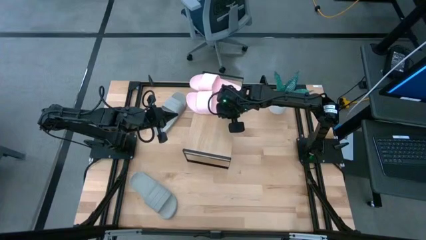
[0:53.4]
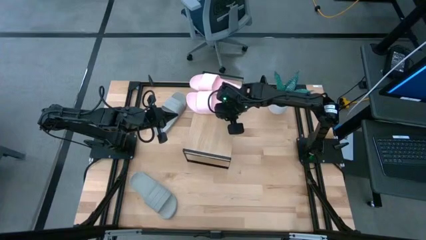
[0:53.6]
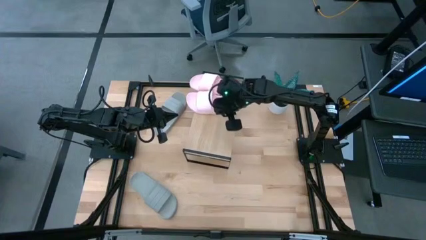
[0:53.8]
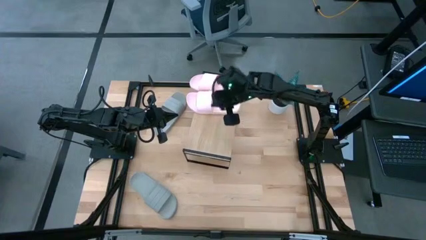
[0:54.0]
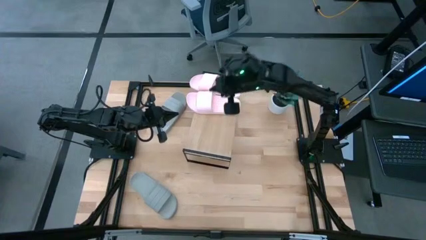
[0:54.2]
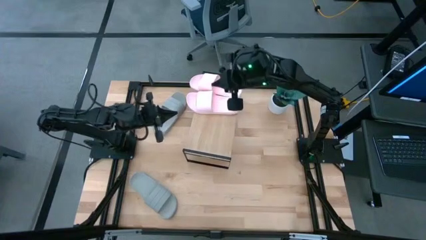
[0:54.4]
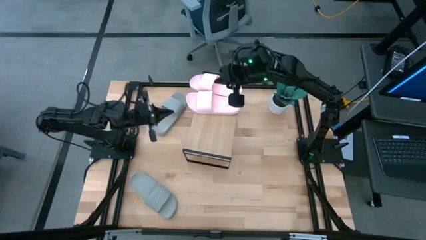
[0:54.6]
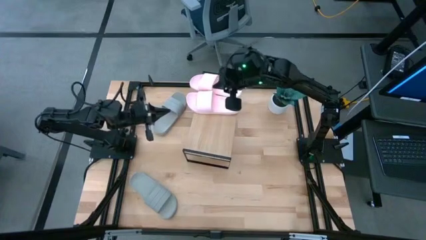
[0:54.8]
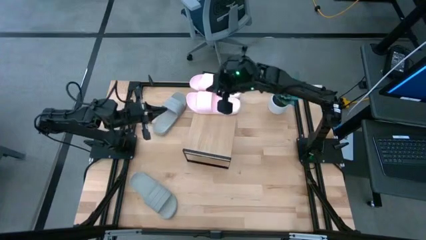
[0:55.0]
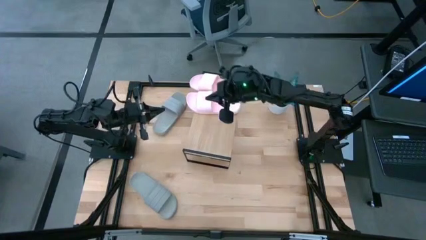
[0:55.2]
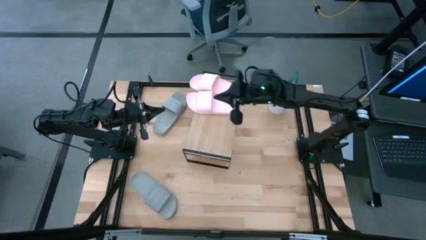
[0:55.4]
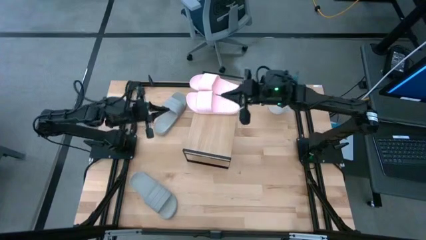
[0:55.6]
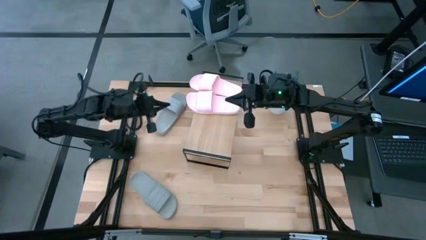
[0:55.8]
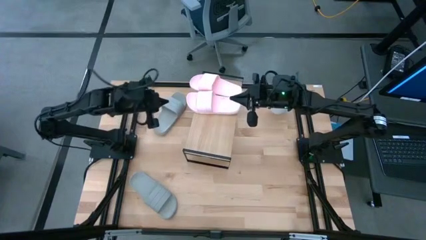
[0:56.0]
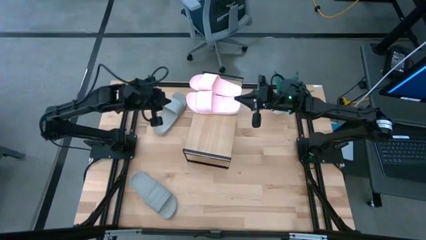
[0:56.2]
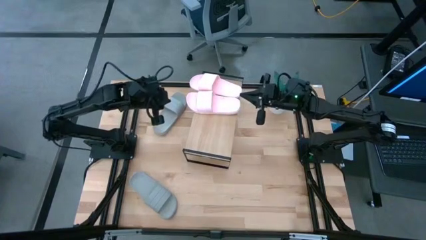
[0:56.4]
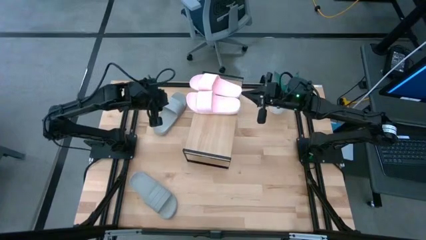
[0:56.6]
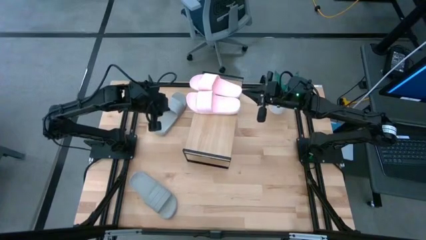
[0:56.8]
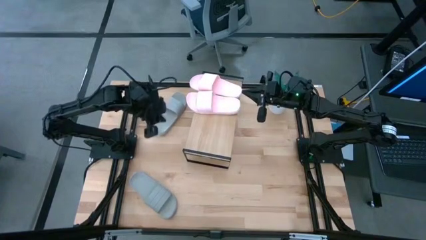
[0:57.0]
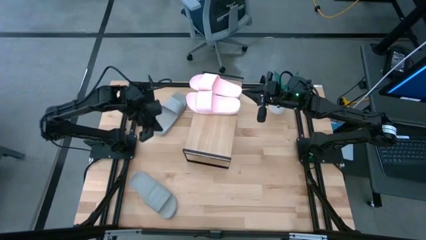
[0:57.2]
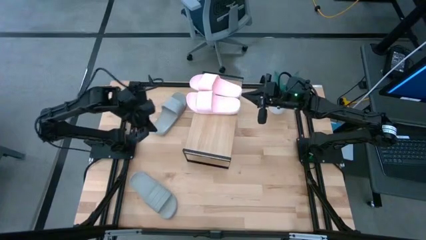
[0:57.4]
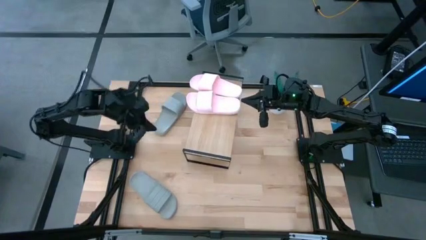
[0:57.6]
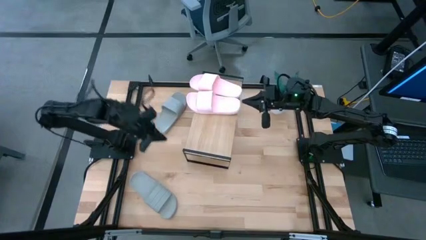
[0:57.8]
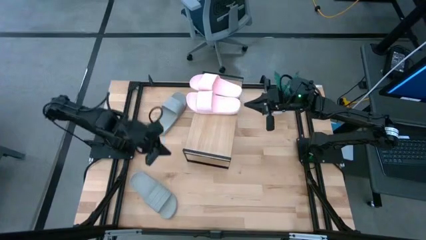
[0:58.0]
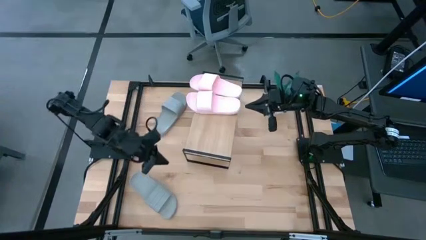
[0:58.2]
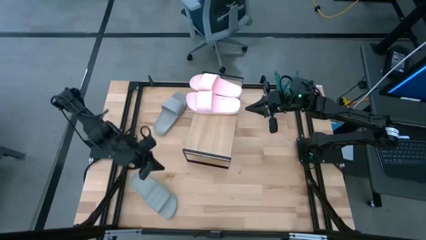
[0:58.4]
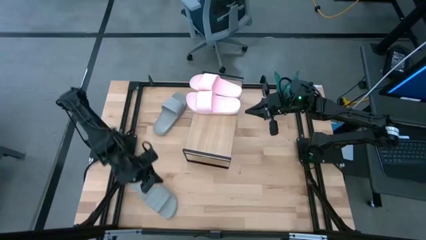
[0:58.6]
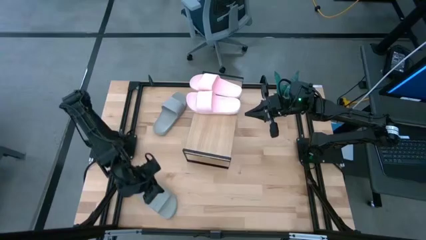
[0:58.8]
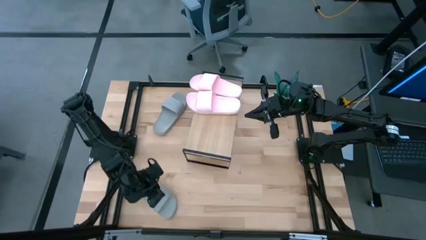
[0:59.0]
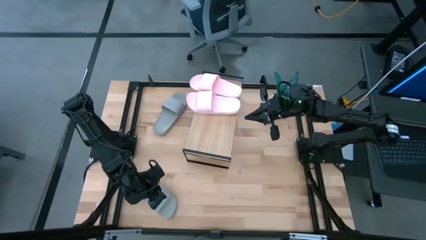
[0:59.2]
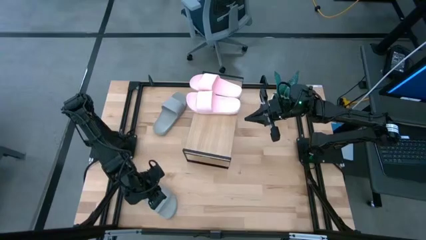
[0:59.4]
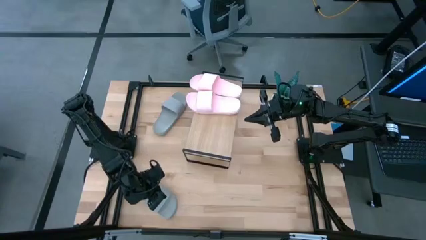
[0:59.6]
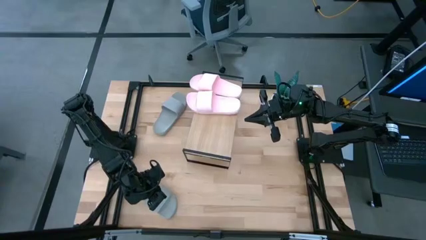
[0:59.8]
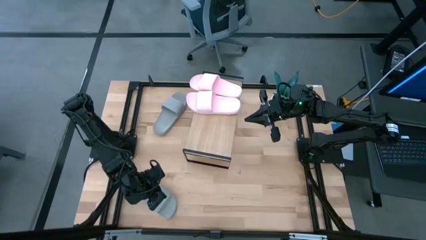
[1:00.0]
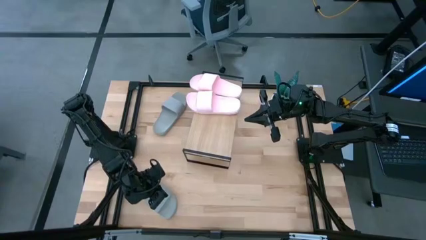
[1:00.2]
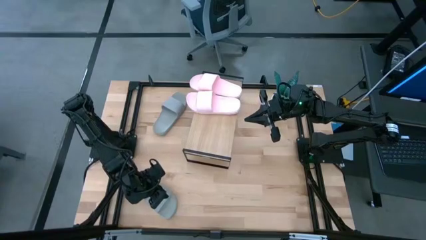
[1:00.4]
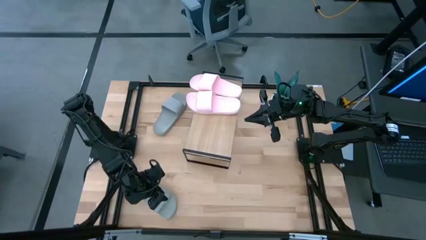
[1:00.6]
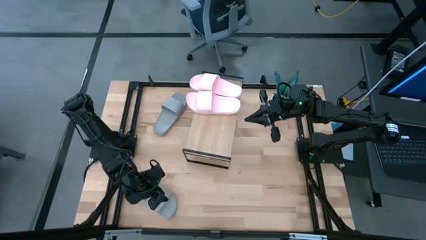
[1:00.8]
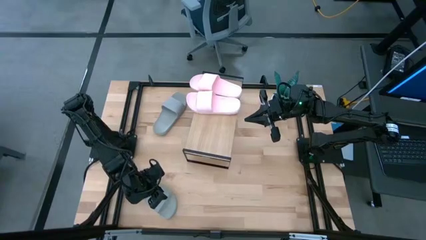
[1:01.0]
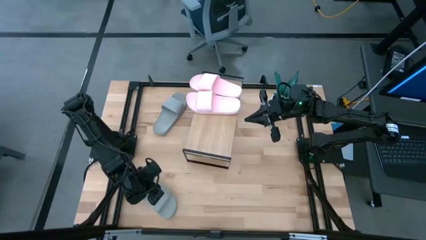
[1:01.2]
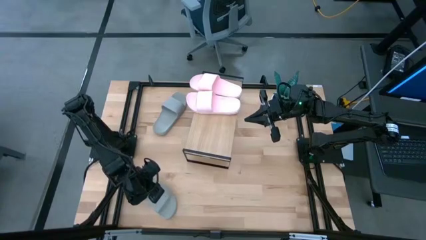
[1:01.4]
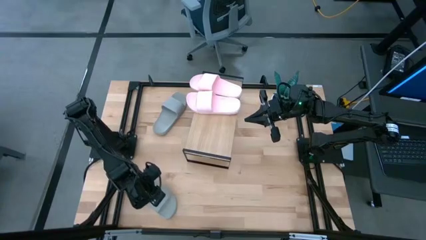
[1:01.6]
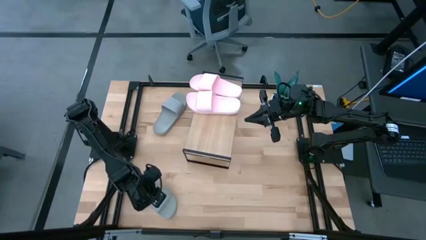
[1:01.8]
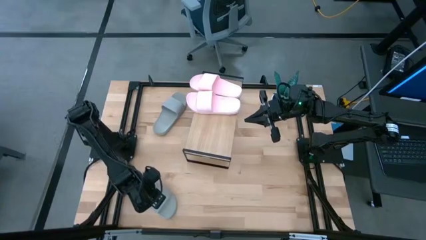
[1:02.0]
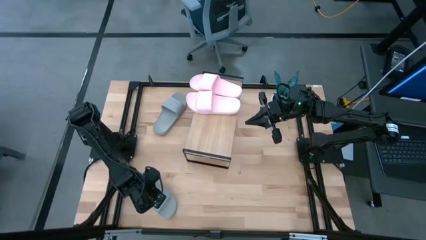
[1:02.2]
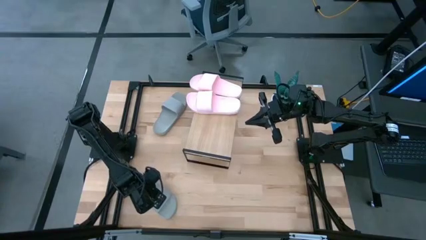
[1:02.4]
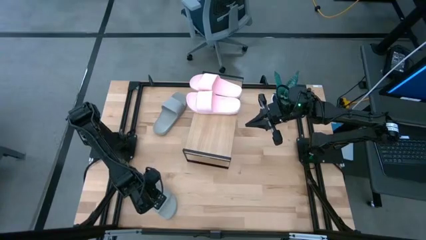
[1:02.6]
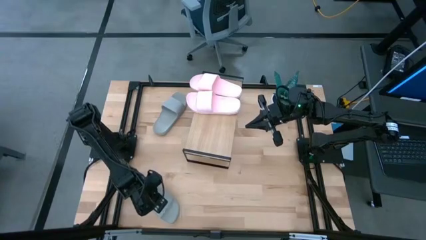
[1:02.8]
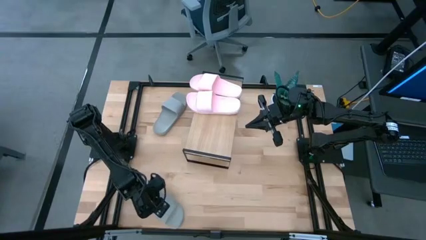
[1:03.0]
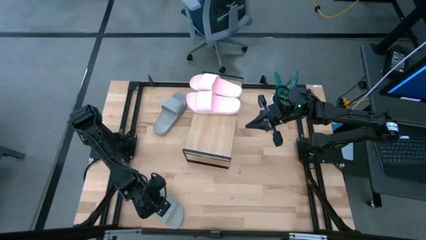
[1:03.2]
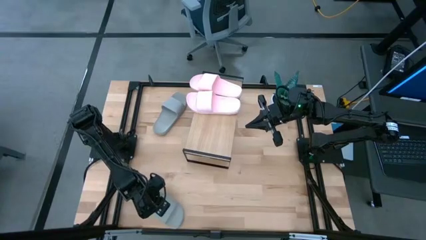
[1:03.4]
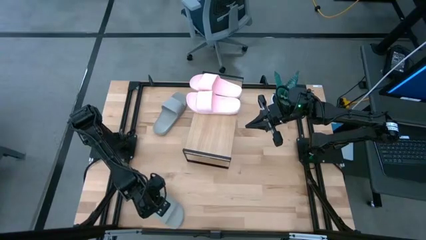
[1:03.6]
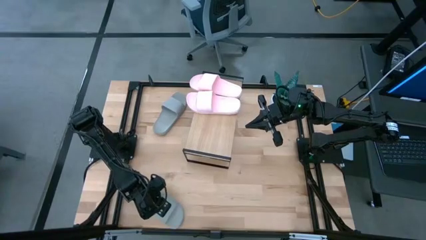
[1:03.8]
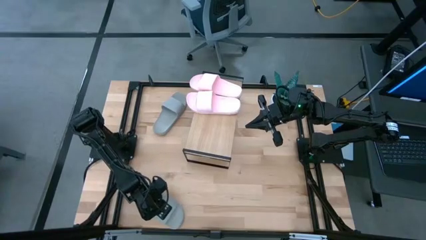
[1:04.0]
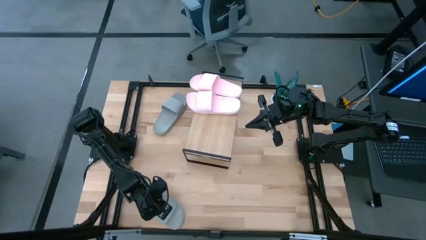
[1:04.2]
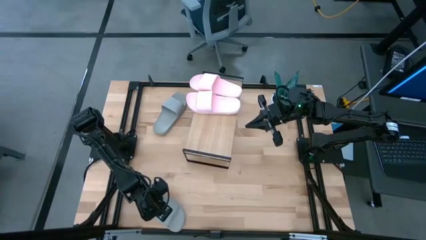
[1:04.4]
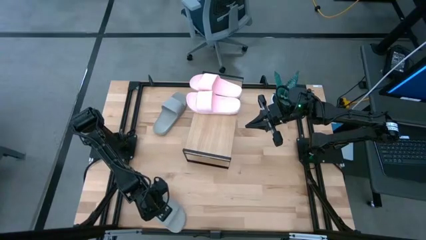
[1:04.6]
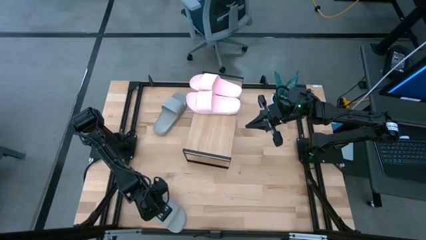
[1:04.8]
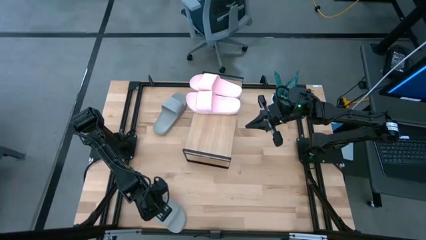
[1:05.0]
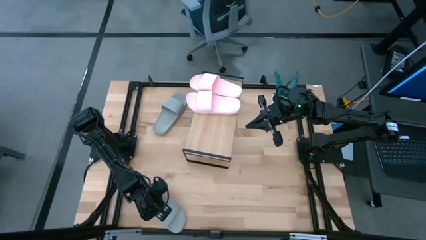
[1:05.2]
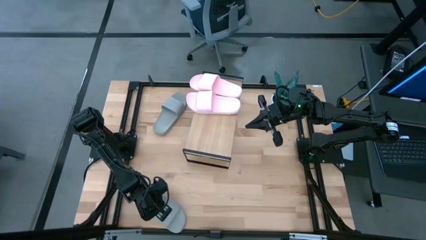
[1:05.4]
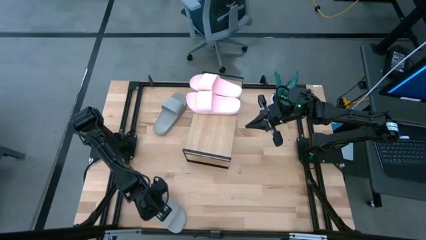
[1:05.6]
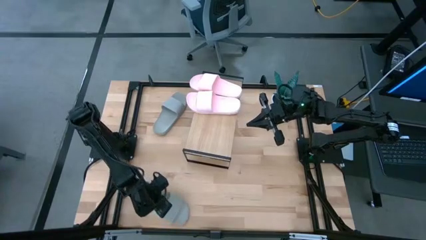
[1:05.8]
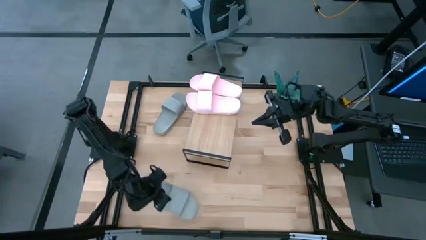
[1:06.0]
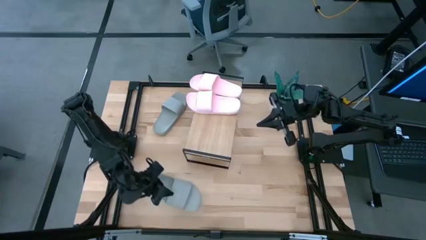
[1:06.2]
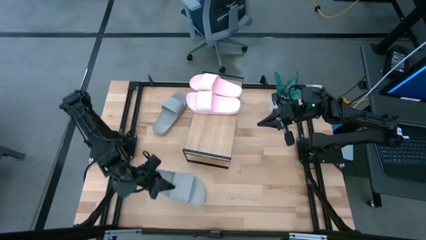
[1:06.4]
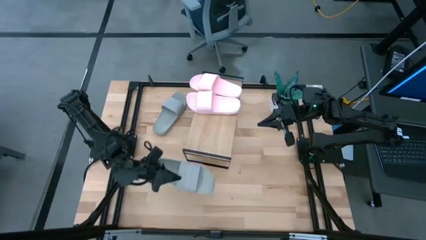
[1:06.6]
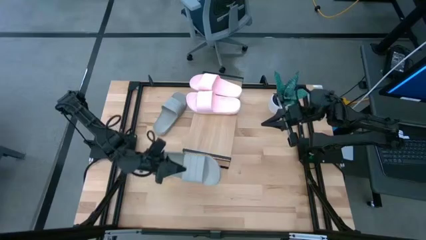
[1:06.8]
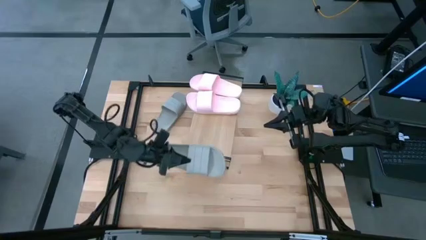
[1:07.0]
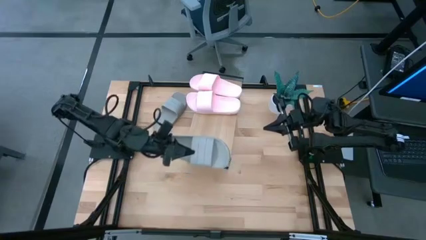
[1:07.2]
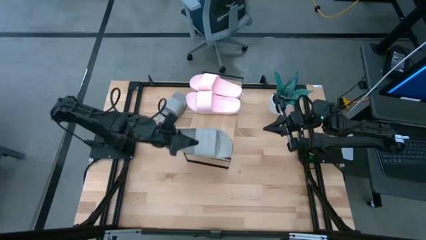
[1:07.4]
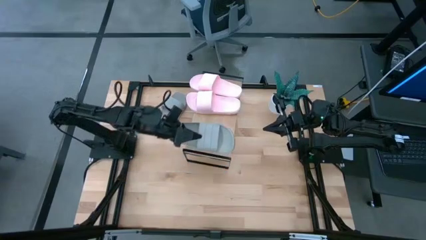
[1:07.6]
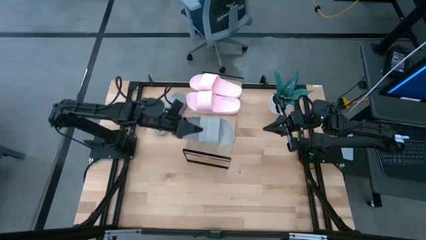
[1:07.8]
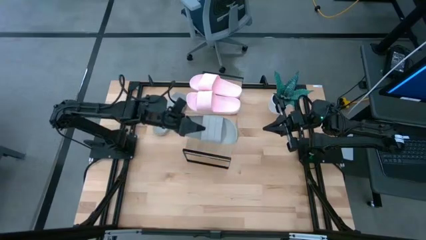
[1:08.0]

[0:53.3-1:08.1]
Task: Pick and place slides into the shelf
Put the left gray slipper on the shelf
